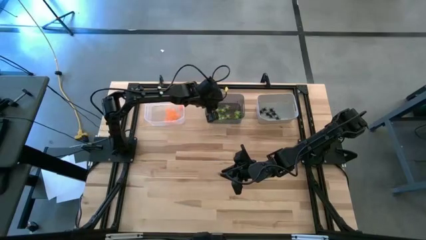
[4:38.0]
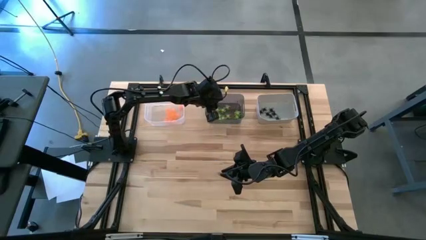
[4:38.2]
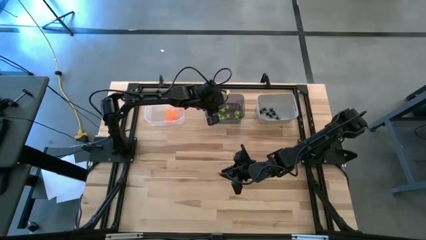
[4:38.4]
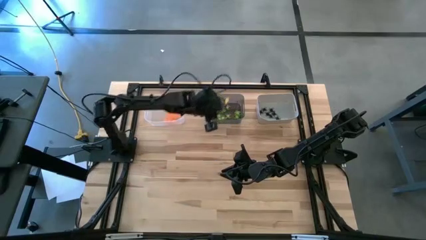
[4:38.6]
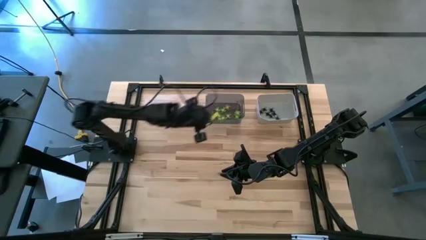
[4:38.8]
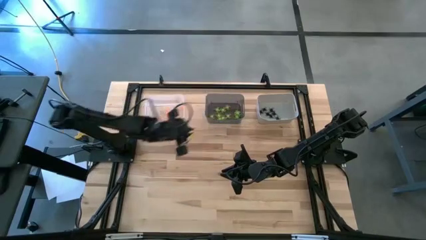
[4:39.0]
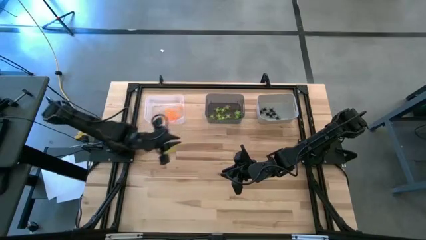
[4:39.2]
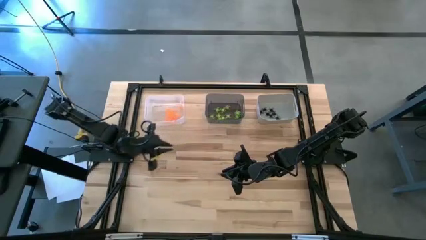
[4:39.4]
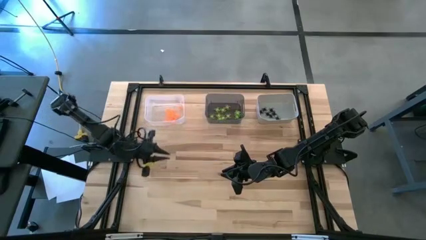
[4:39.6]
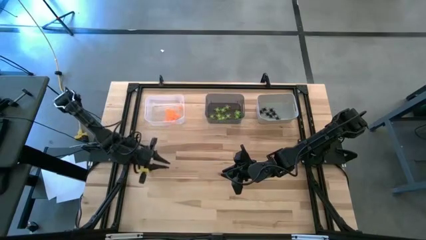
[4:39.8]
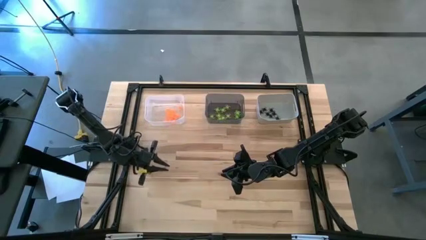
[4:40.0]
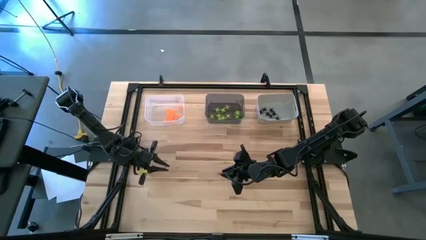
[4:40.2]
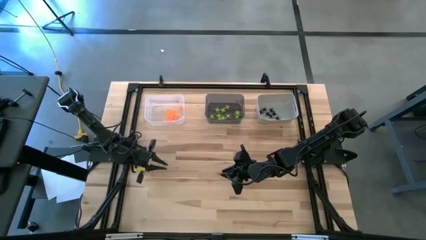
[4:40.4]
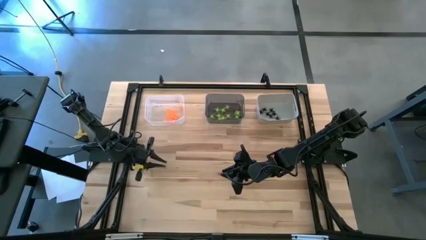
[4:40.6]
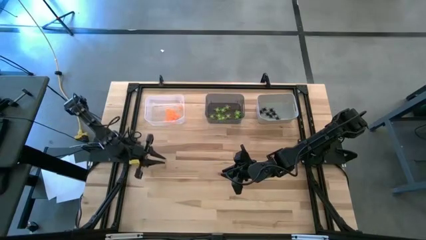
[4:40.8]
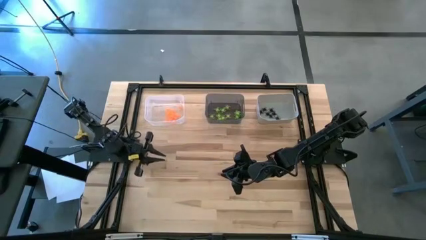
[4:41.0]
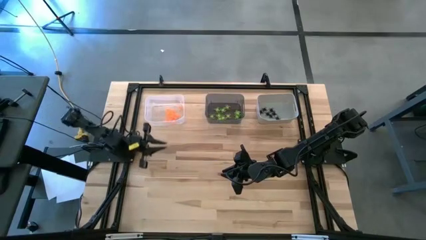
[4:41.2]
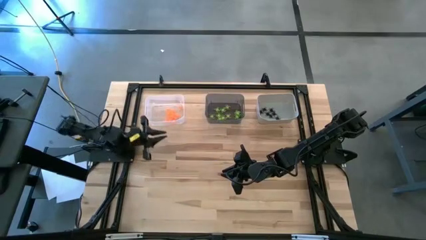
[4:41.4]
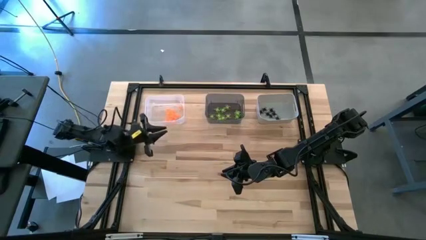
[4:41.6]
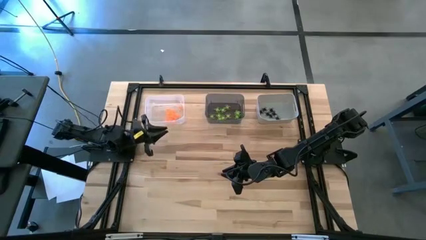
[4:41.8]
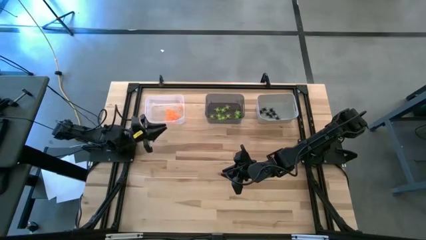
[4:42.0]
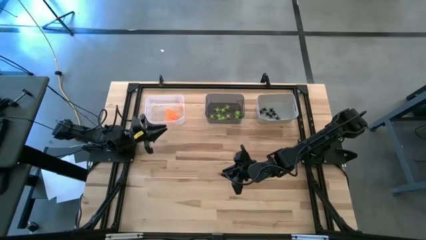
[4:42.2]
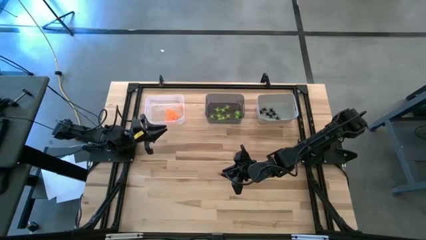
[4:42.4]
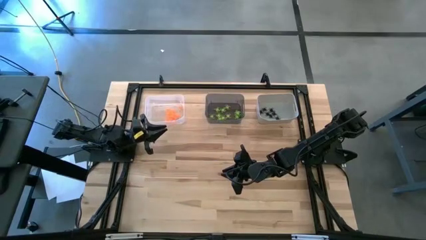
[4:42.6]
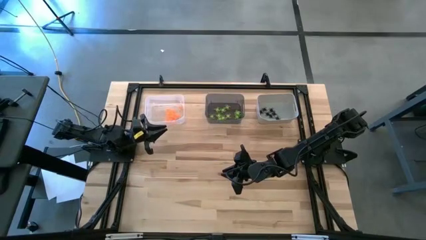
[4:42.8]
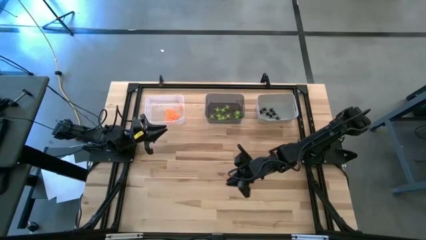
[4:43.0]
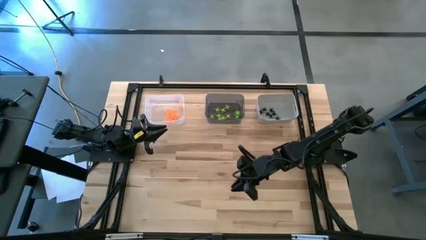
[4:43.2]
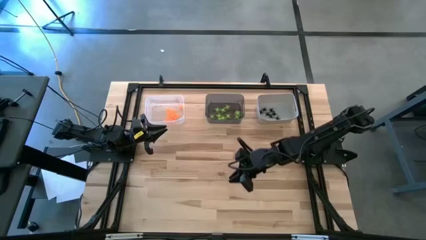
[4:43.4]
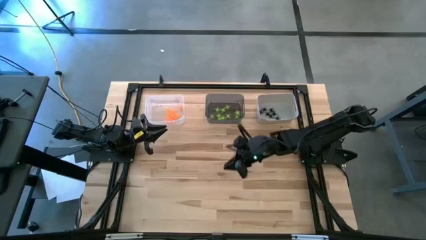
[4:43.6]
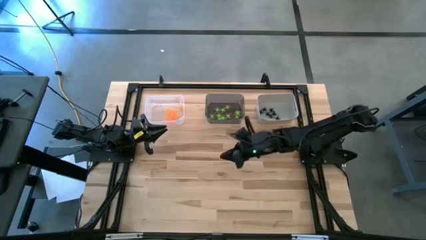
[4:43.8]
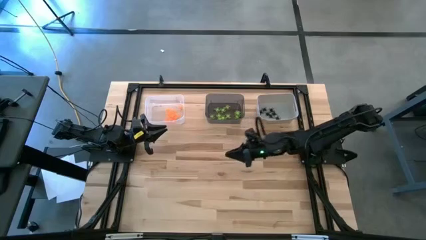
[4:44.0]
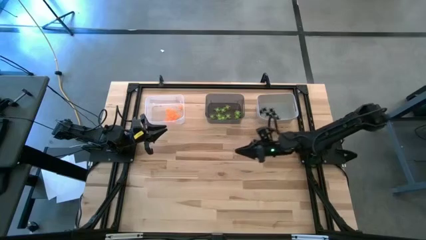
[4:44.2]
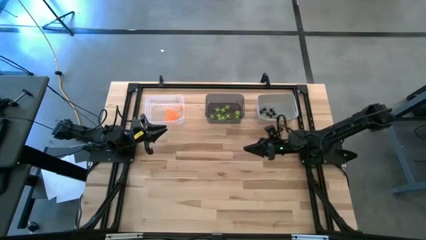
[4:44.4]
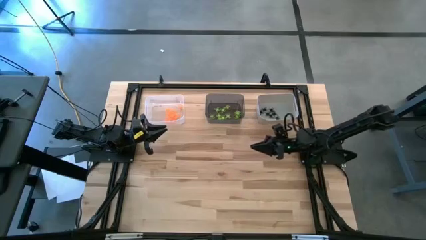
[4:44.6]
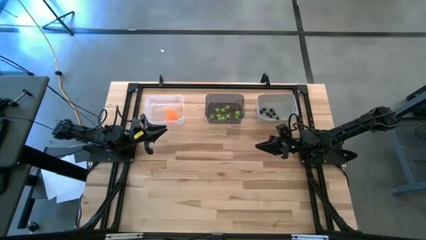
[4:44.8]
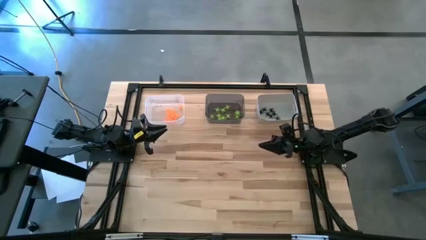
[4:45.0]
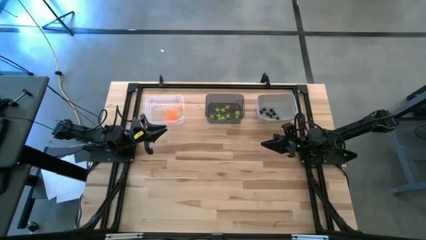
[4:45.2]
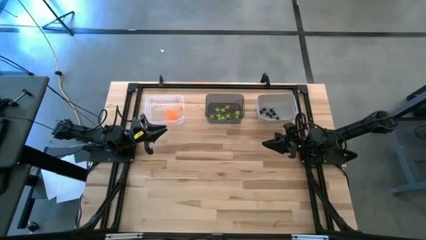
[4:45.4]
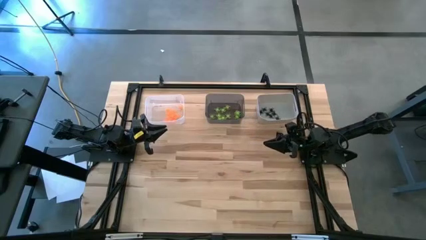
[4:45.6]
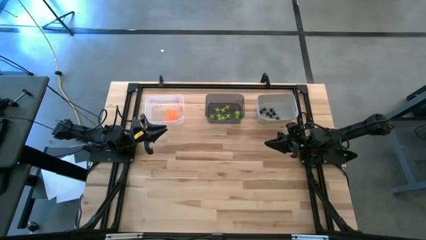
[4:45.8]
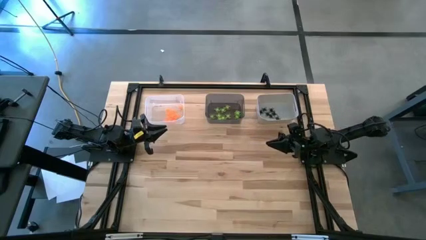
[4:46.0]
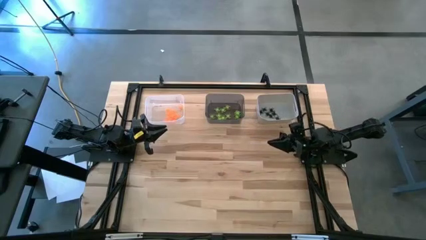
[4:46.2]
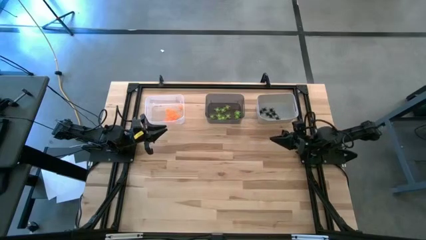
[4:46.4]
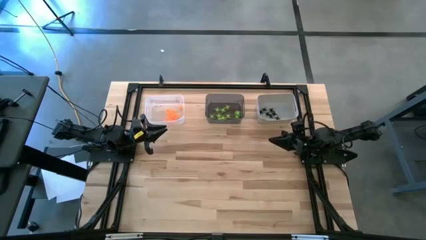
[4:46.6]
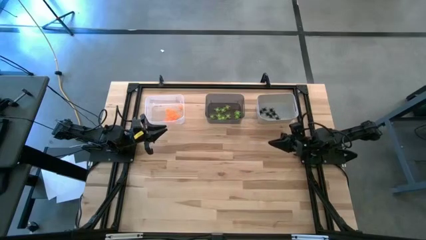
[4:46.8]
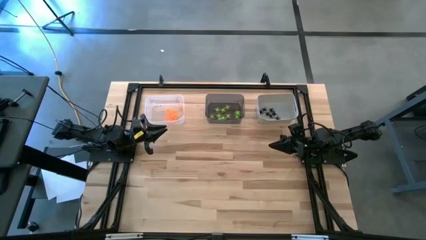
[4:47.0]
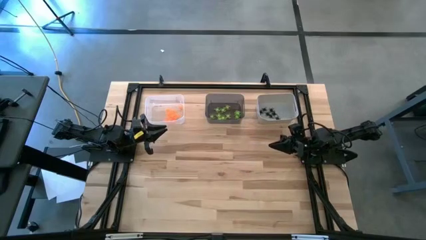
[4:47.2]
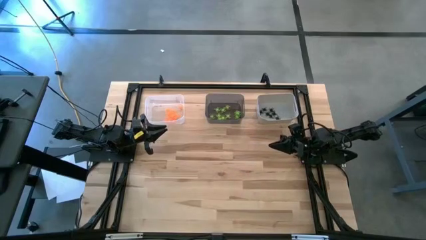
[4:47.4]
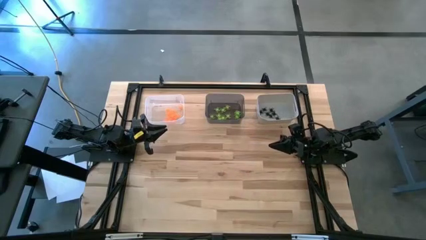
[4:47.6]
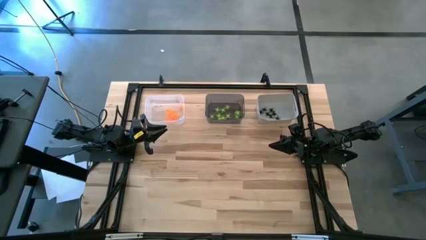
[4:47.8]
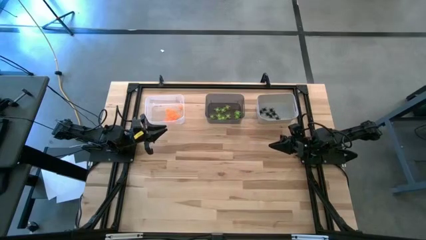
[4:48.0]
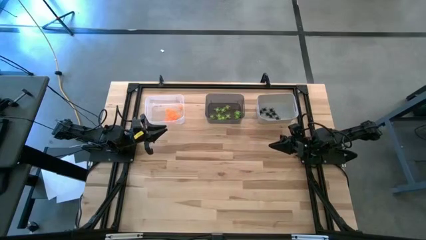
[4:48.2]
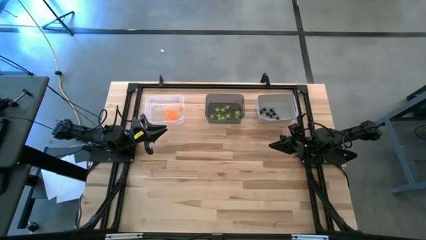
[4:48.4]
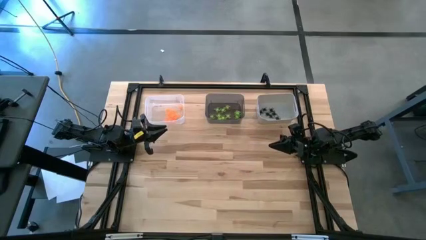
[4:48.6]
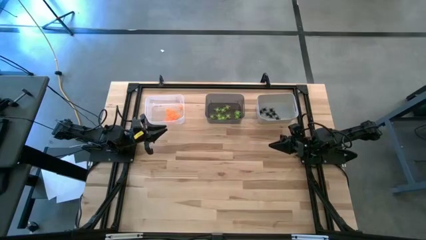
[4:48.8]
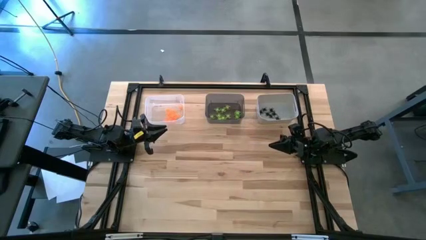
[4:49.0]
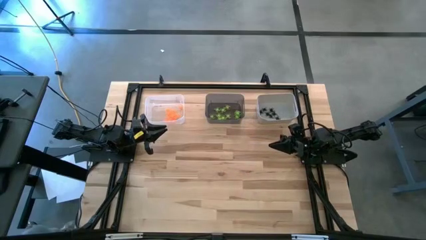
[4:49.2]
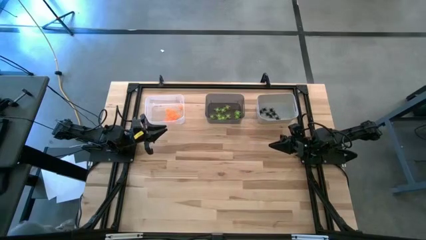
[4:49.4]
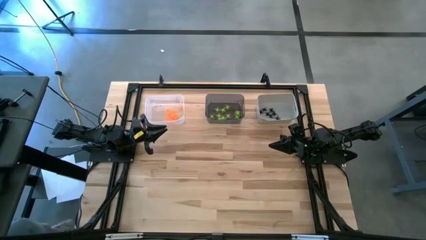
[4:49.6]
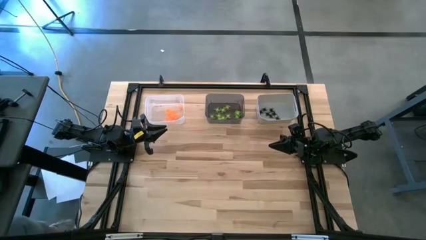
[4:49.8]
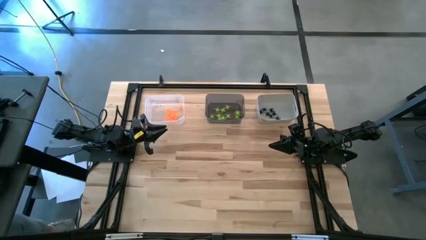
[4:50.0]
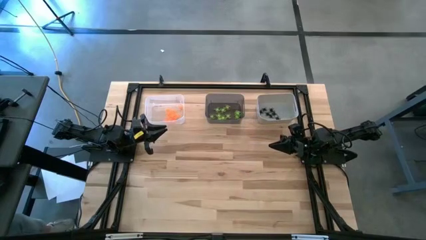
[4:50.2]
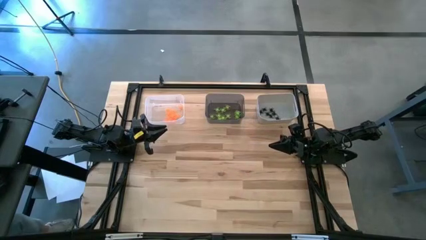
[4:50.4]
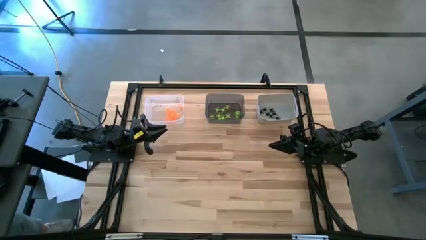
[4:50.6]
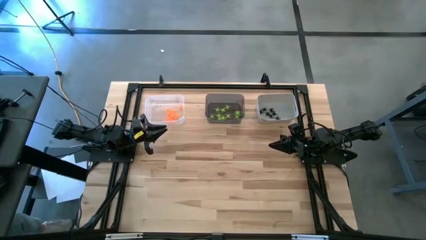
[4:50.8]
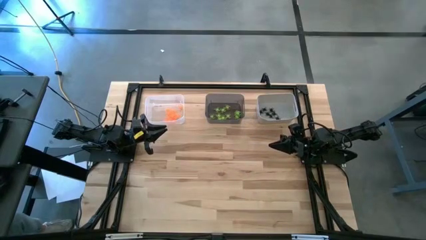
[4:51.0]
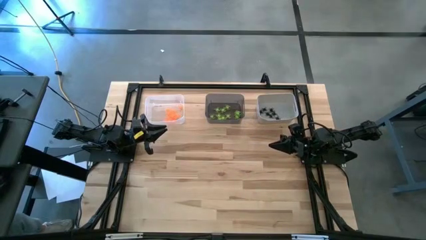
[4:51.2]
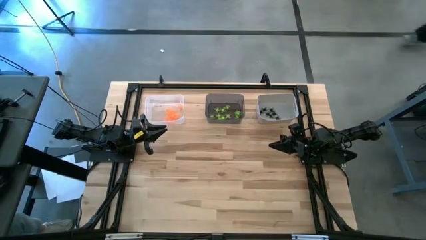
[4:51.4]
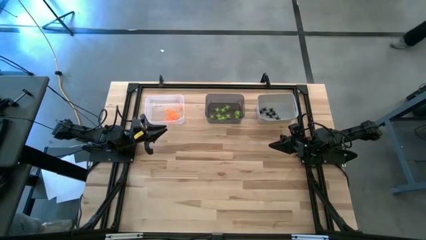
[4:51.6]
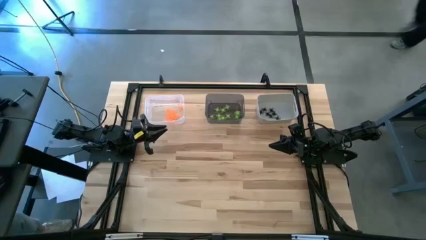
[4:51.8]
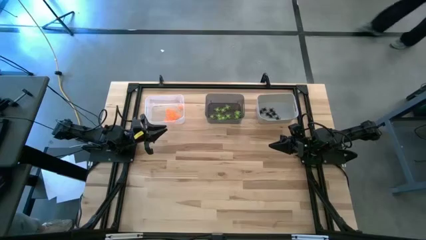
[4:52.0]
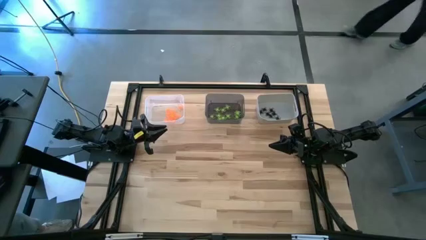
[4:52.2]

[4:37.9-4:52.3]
Task: Sort Halloween decoration
Return to Home Position

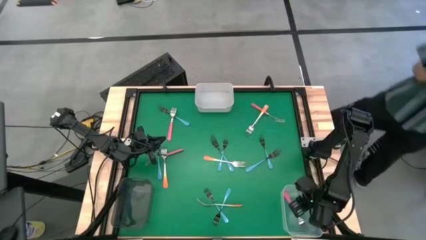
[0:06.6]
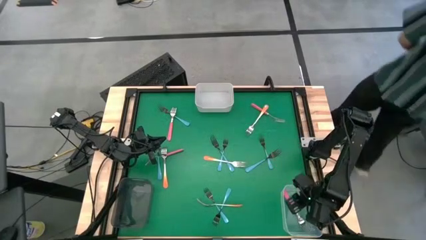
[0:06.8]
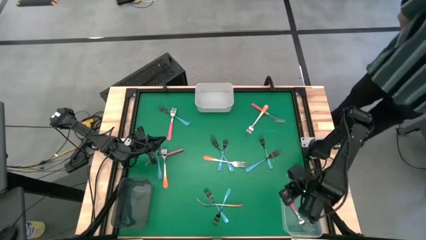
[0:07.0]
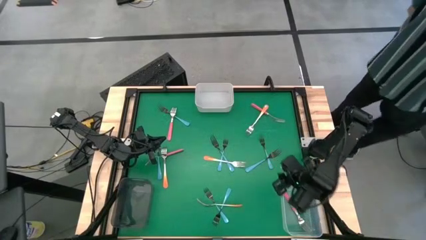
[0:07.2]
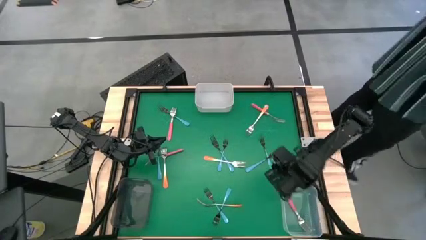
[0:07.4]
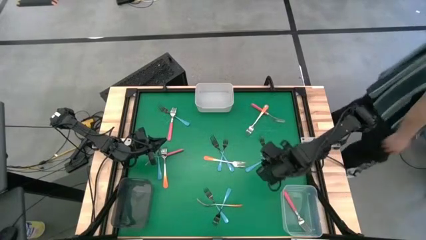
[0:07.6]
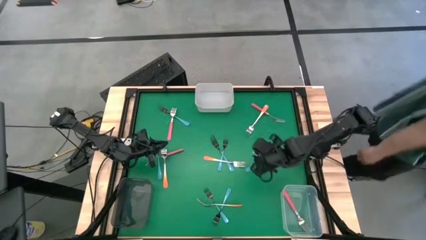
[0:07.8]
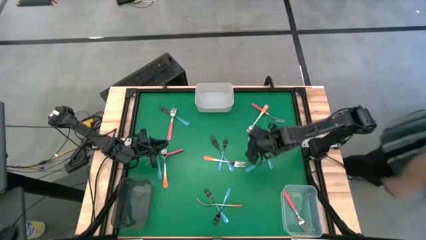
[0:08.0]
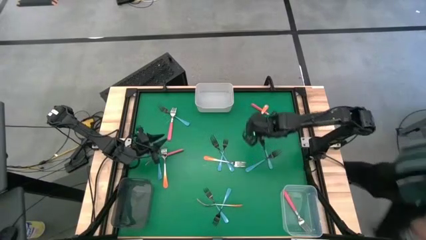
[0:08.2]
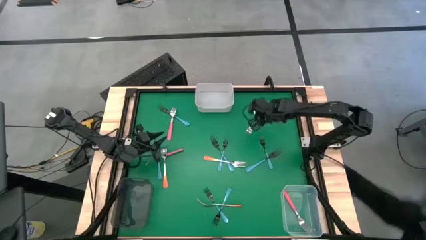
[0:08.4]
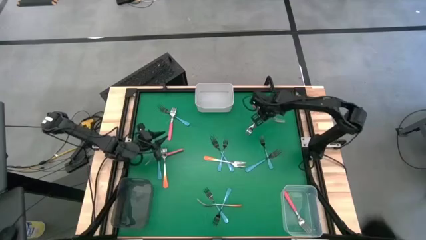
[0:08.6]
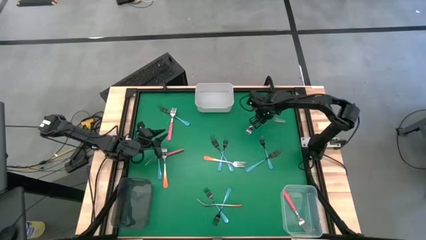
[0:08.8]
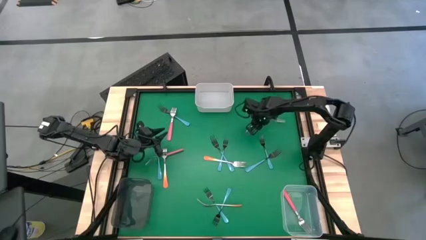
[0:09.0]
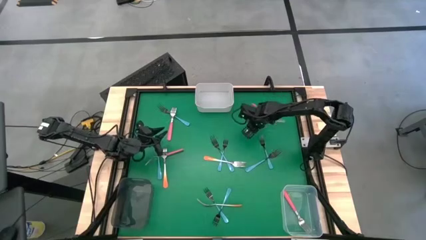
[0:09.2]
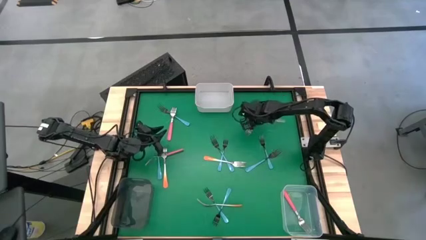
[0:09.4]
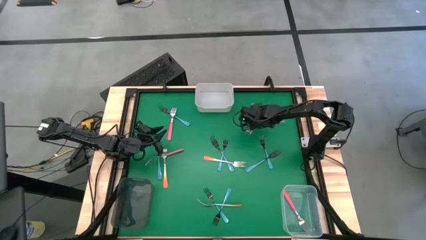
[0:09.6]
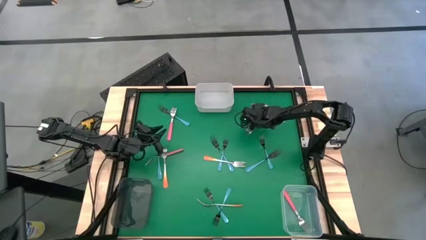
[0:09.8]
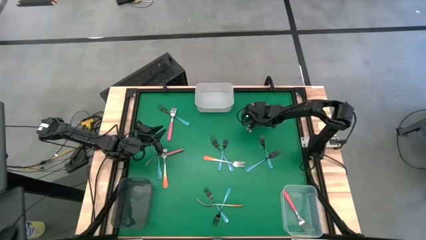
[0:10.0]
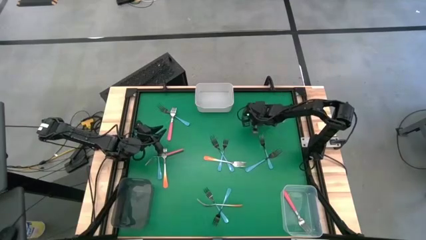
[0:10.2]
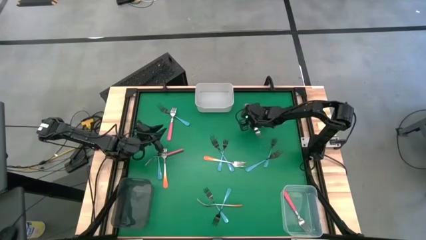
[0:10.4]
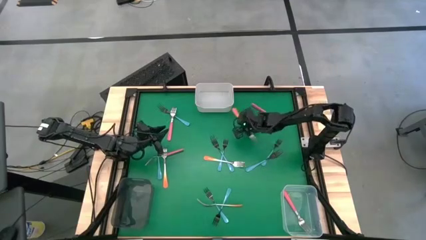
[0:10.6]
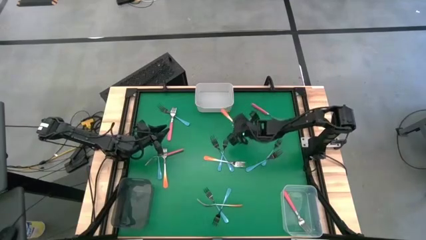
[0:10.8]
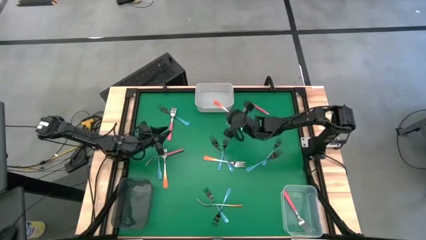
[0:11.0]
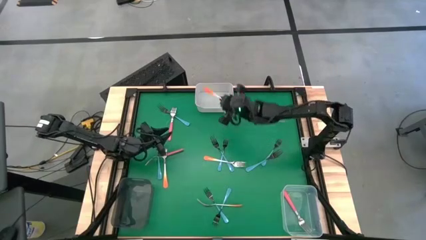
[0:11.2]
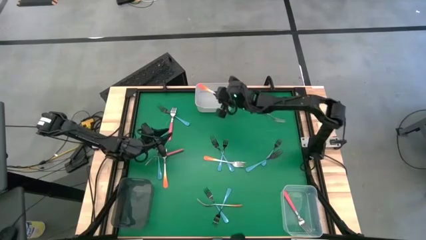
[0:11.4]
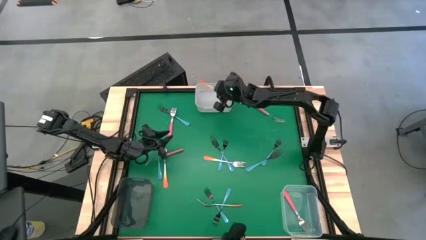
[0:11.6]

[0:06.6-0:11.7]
Task: Sort silverware by color (type)
Put the orange fork into the white bin
